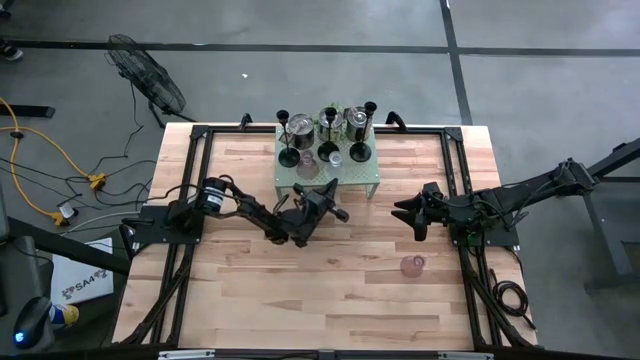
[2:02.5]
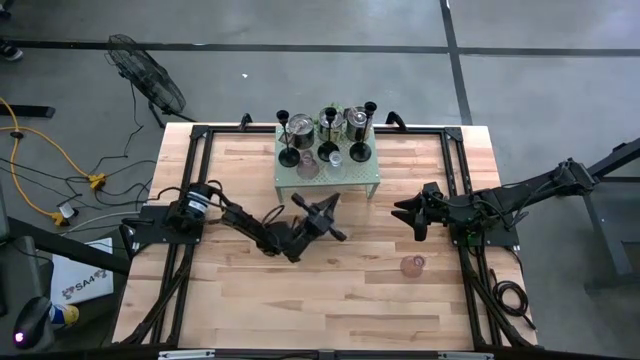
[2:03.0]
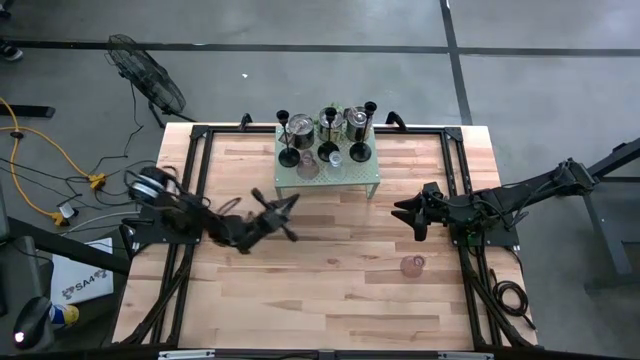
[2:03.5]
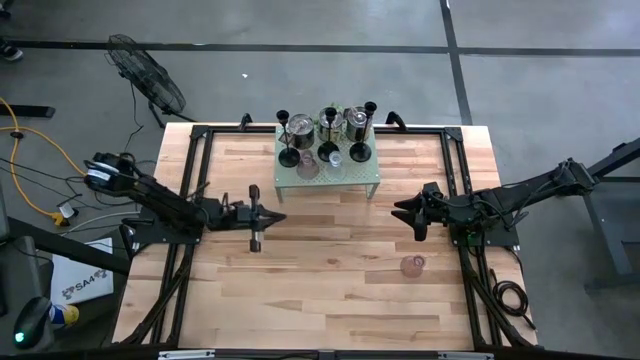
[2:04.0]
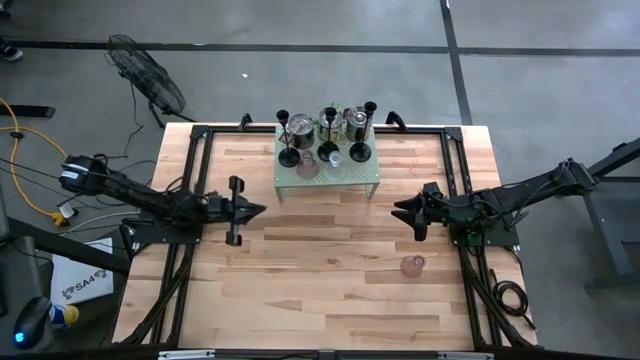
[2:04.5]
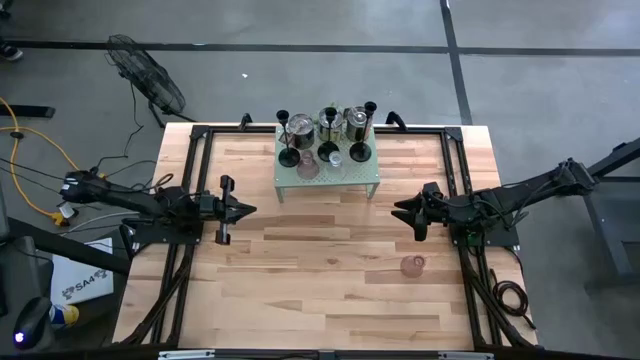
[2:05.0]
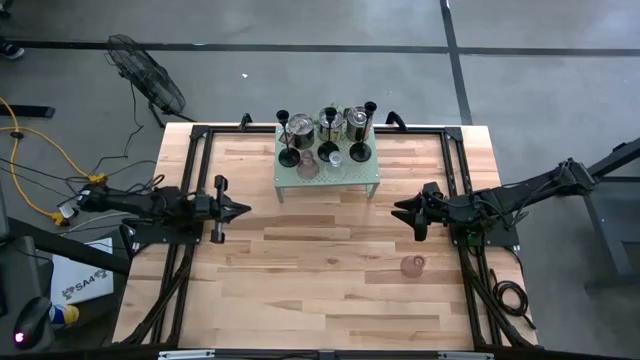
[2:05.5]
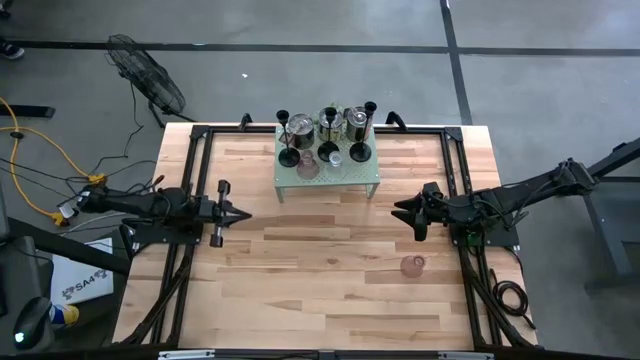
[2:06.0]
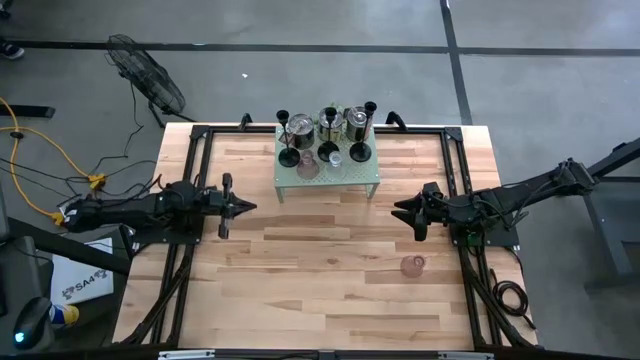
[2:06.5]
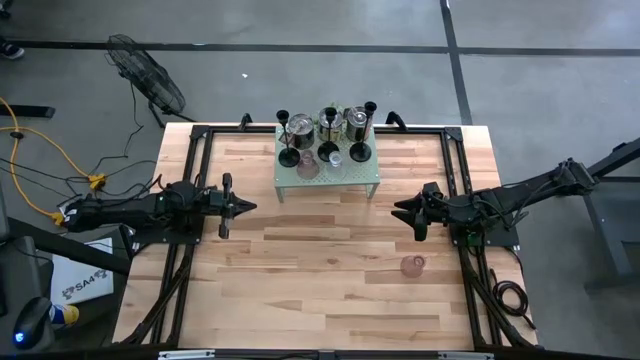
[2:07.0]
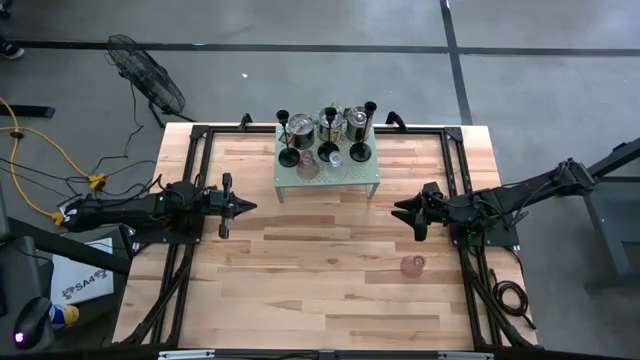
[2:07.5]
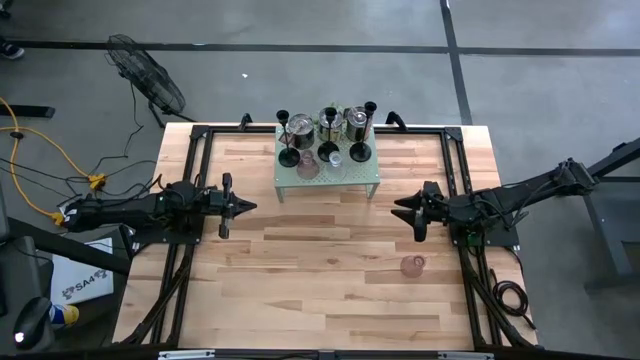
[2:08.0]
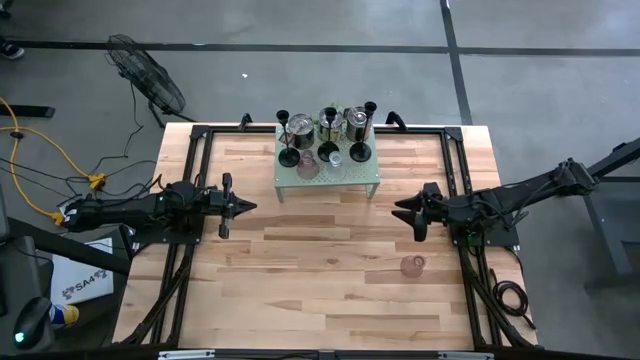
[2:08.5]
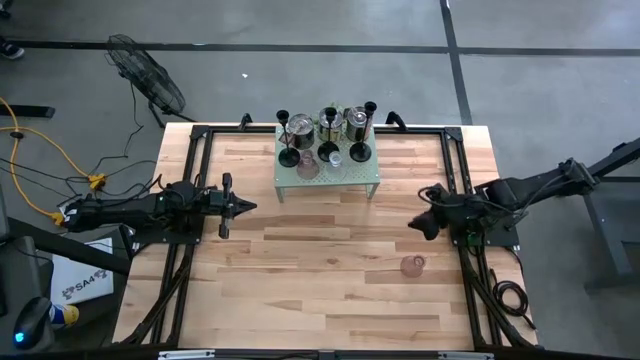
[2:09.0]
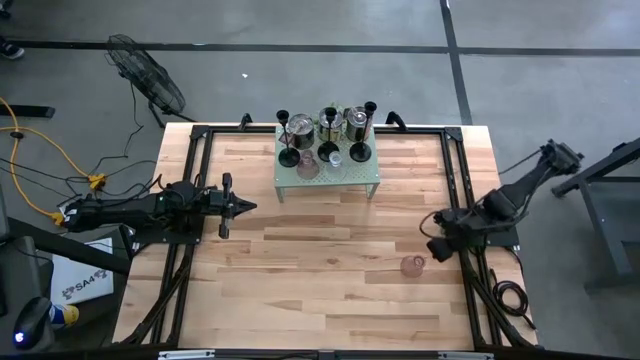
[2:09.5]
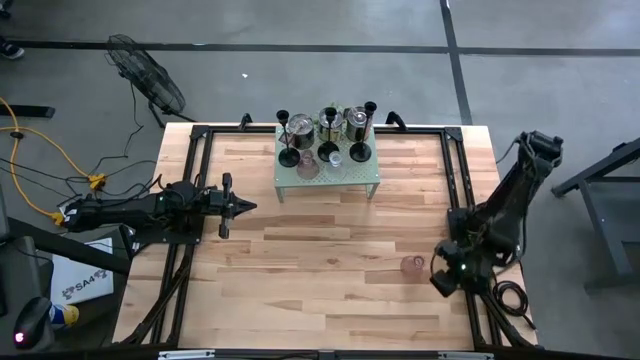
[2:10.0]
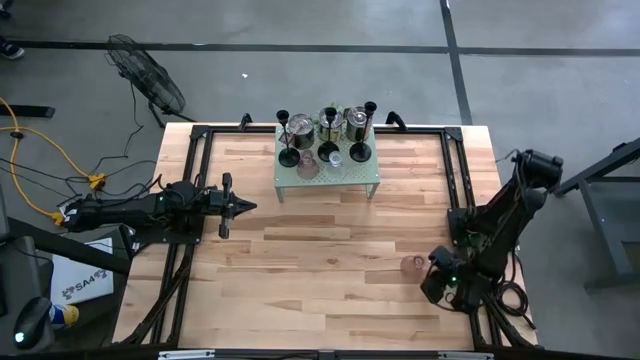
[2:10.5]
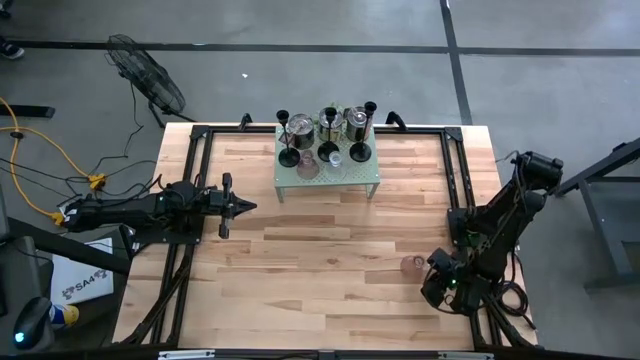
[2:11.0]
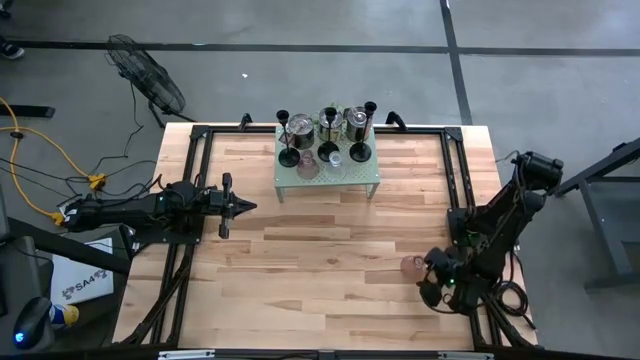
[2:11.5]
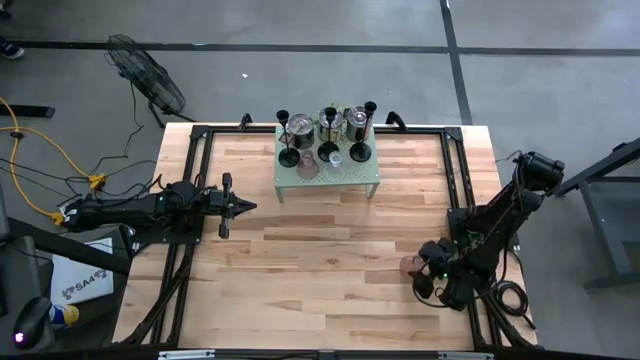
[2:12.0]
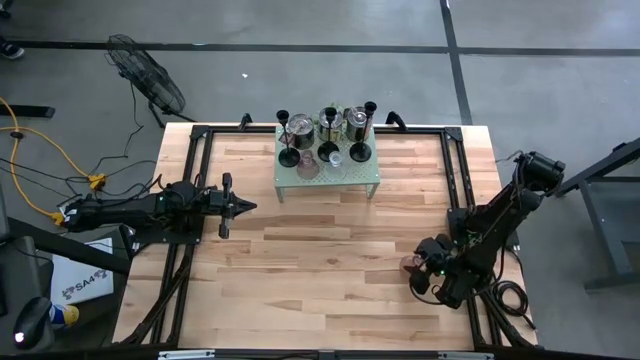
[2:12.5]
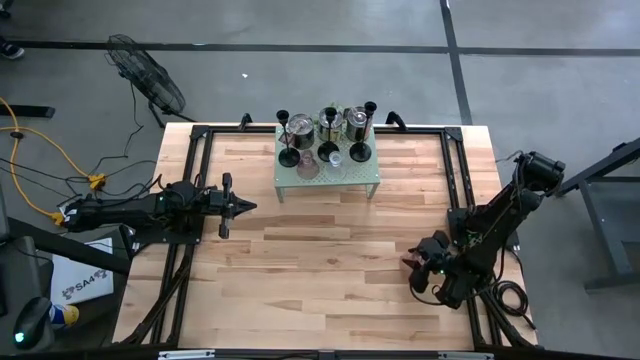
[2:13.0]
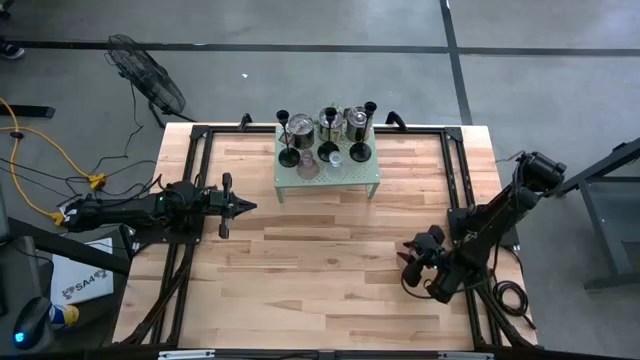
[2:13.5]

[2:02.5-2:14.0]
Task: Pick & Place candle stick holders
Put the pink candle holder on the shelf

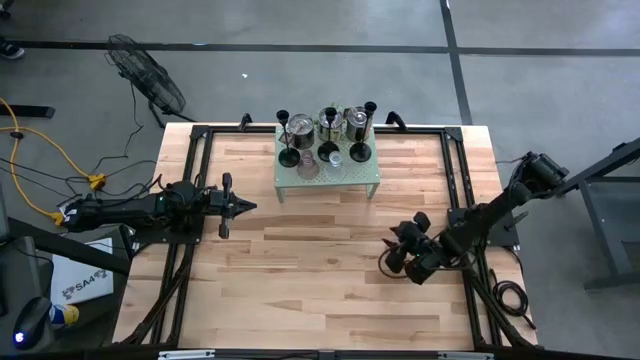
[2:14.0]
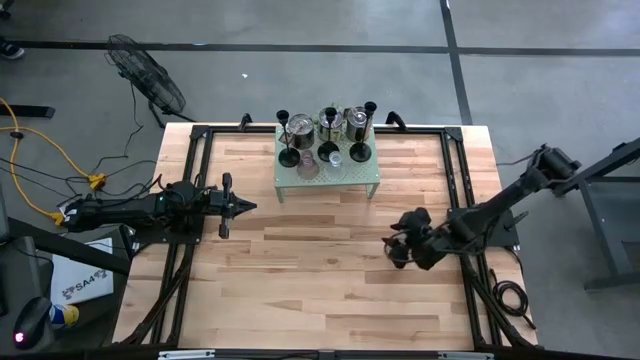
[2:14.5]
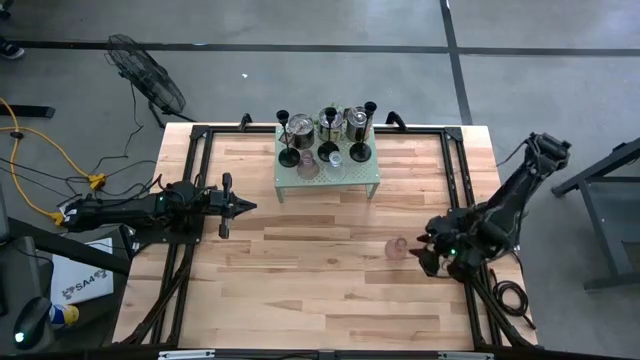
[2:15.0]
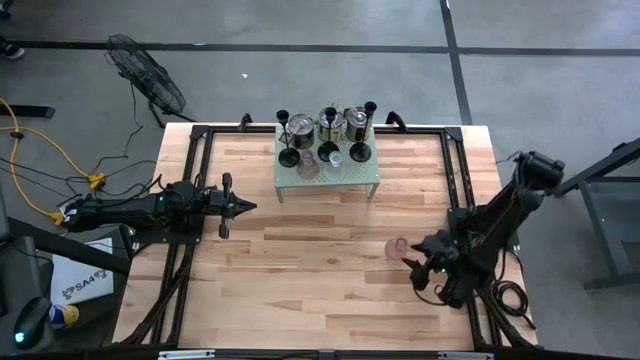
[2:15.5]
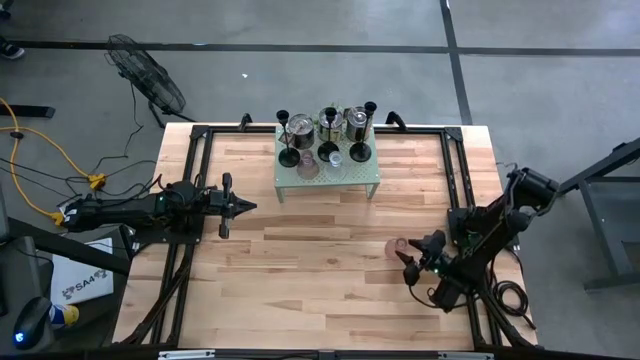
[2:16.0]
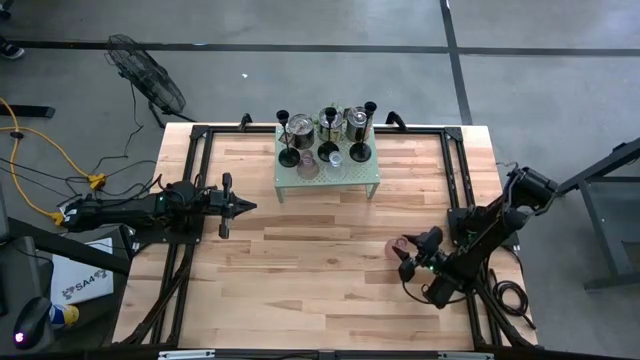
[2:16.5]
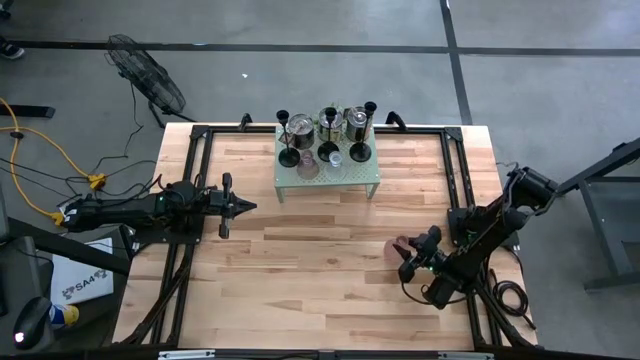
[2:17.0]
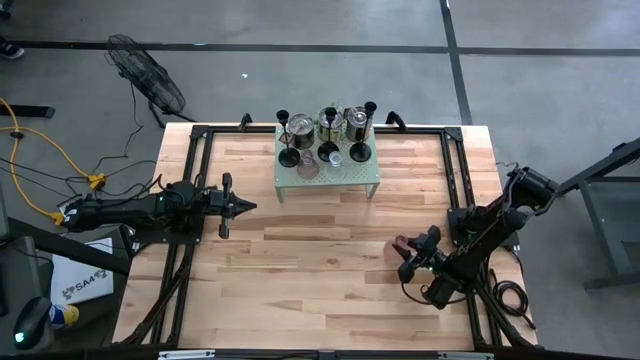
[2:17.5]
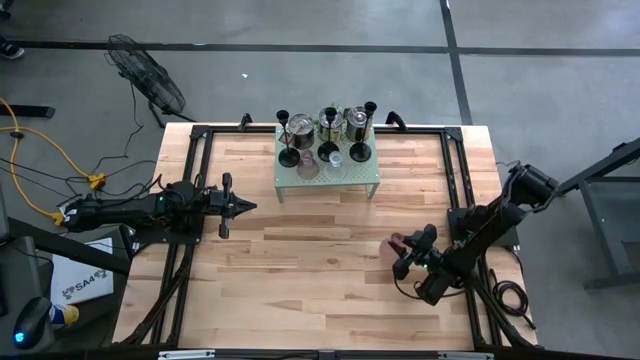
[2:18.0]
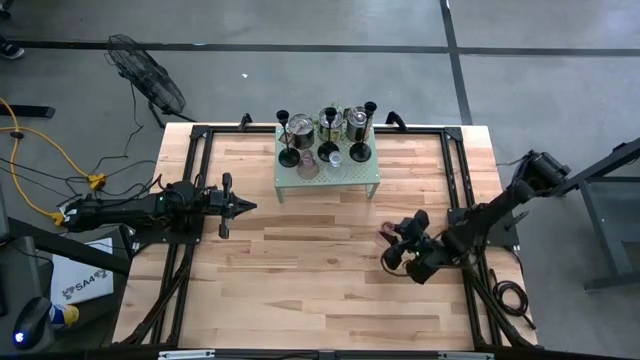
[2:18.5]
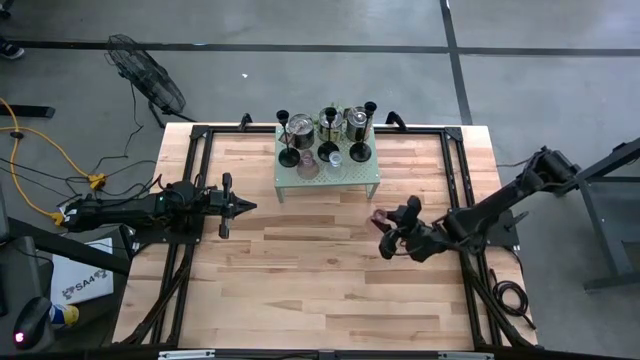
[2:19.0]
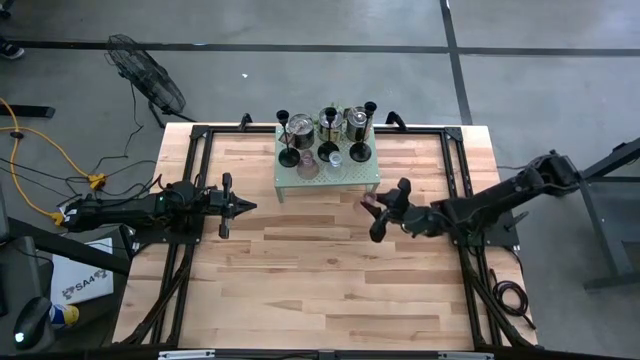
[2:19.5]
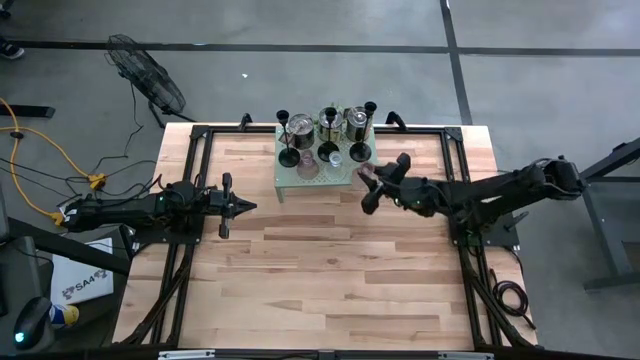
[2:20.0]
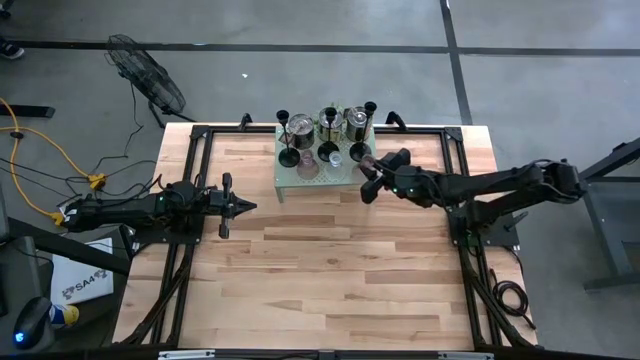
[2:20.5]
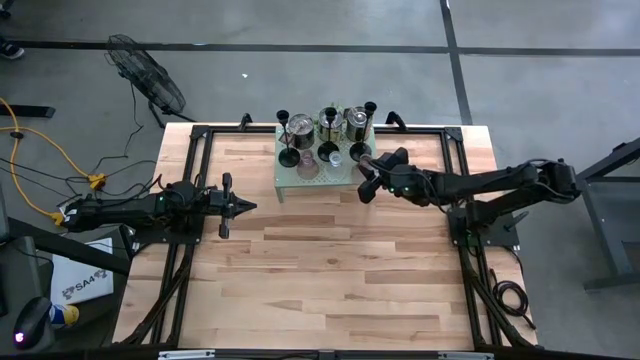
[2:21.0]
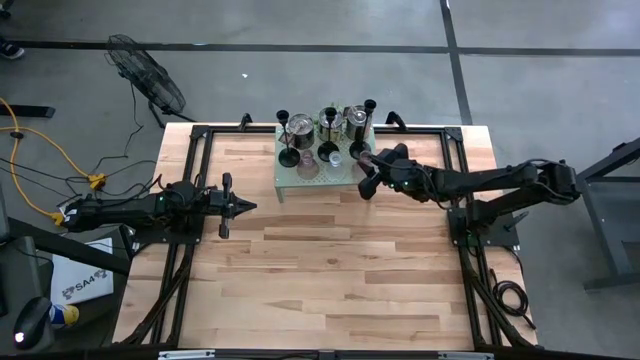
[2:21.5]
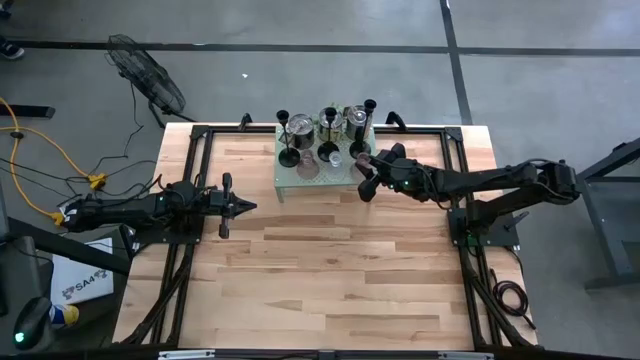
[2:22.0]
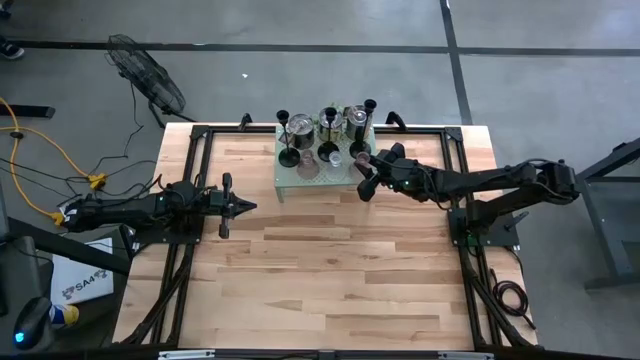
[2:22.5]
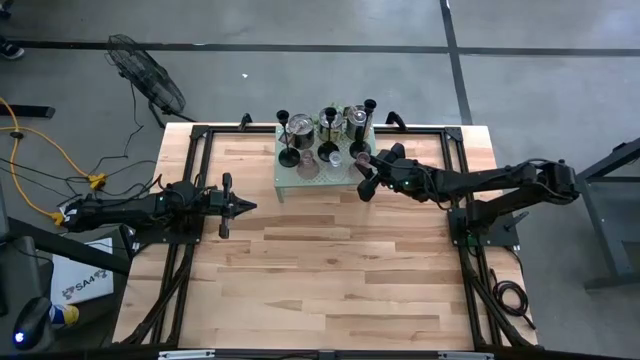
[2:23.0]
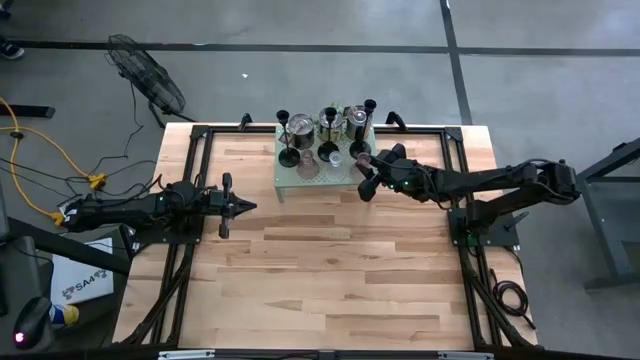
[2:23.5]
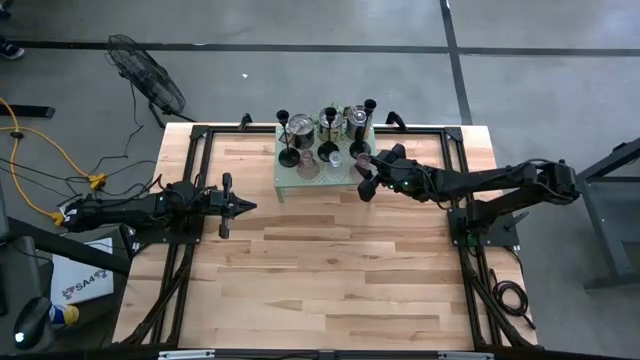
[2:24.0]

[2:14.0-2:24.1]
Put the pink candle holder on the shelf
